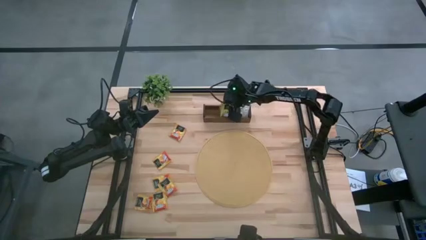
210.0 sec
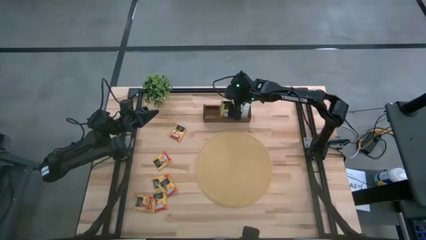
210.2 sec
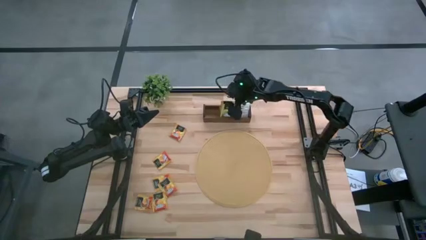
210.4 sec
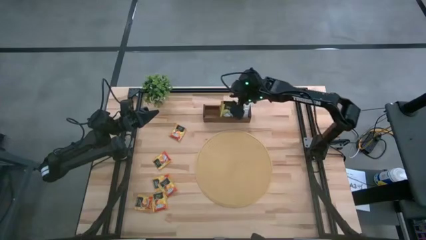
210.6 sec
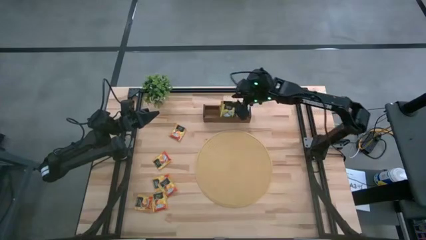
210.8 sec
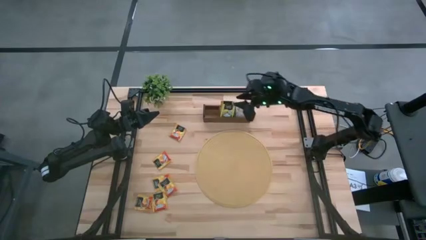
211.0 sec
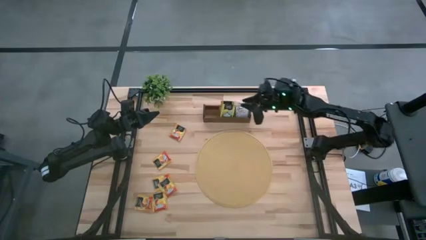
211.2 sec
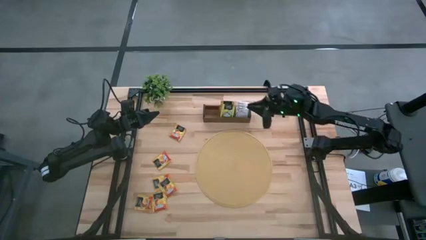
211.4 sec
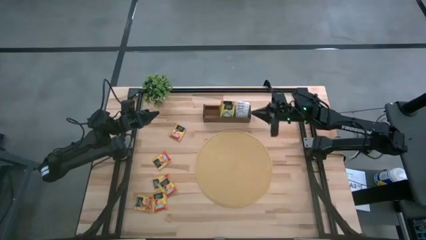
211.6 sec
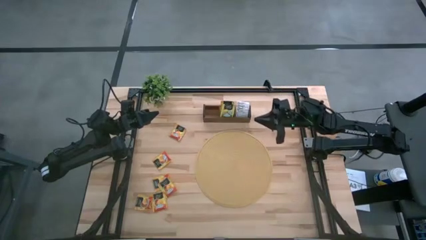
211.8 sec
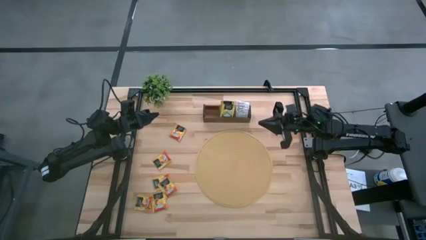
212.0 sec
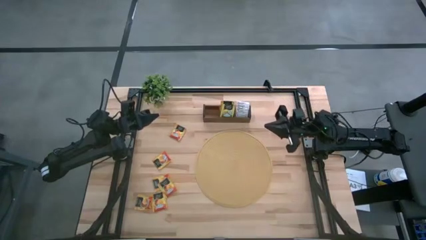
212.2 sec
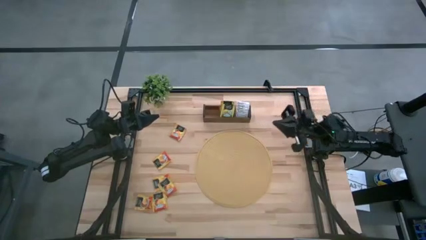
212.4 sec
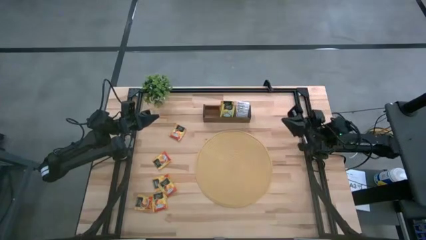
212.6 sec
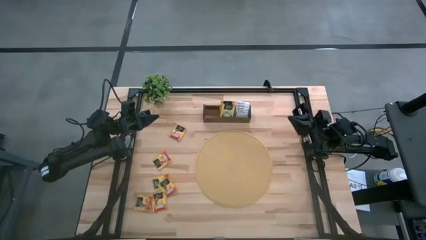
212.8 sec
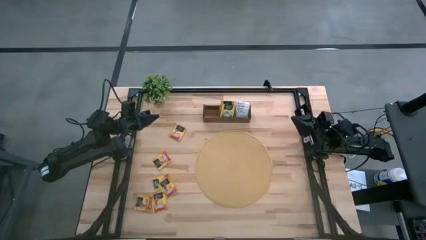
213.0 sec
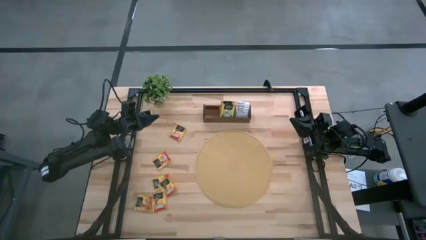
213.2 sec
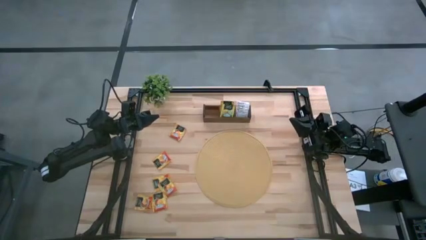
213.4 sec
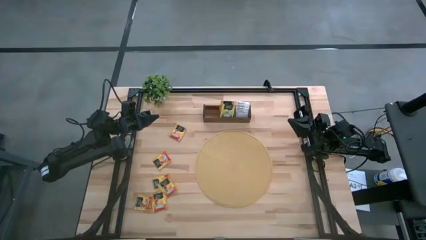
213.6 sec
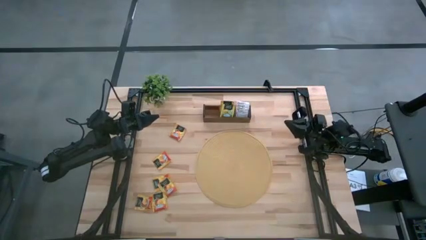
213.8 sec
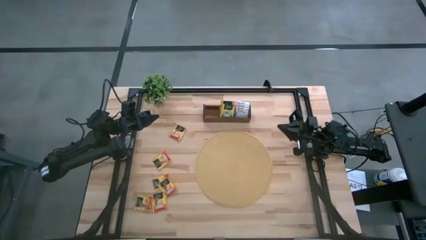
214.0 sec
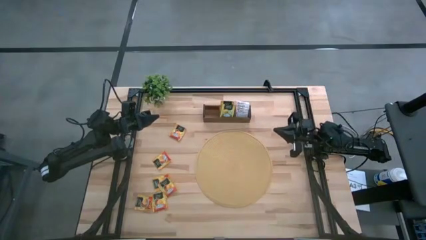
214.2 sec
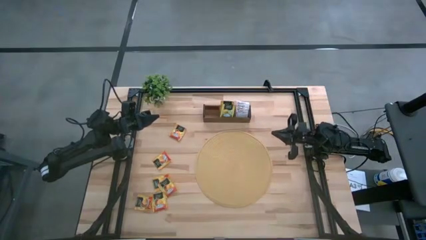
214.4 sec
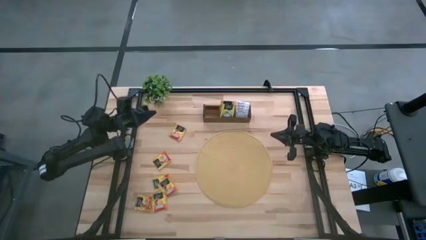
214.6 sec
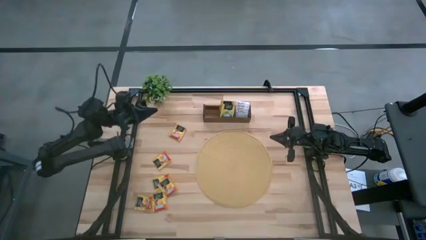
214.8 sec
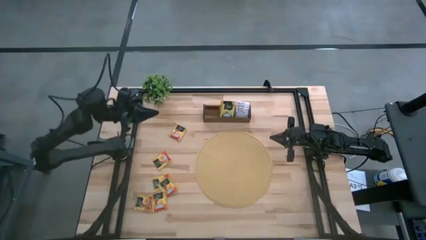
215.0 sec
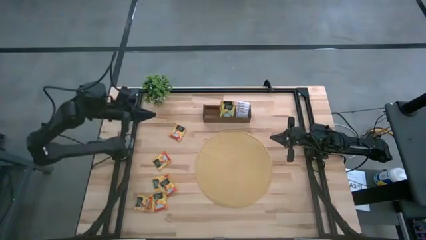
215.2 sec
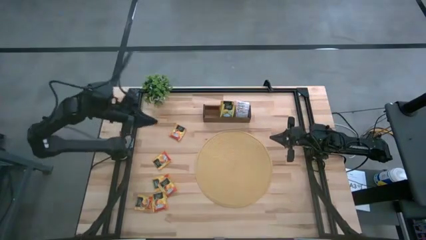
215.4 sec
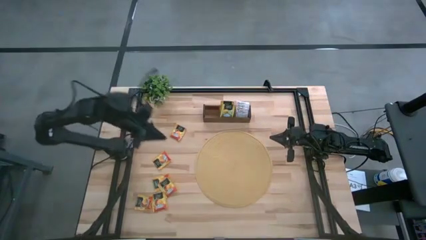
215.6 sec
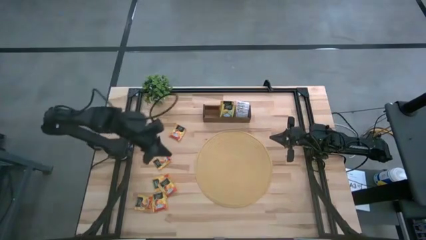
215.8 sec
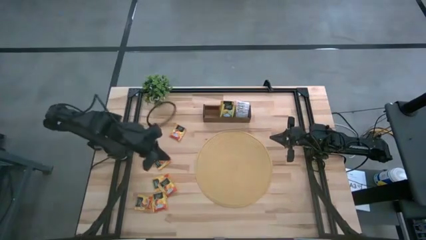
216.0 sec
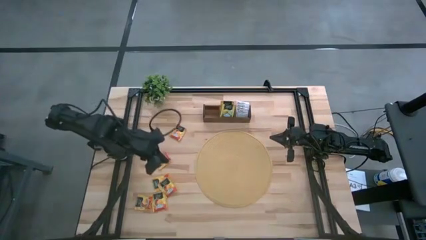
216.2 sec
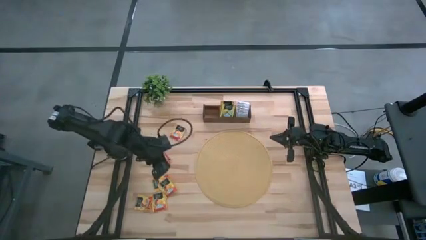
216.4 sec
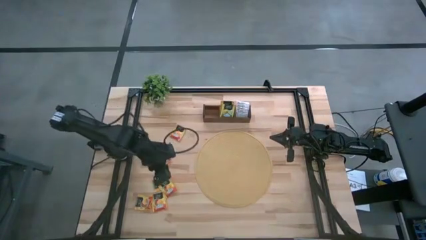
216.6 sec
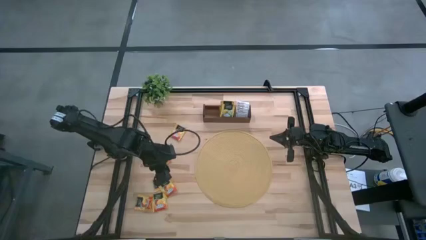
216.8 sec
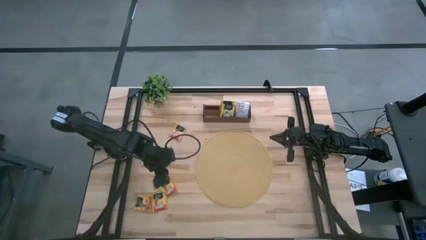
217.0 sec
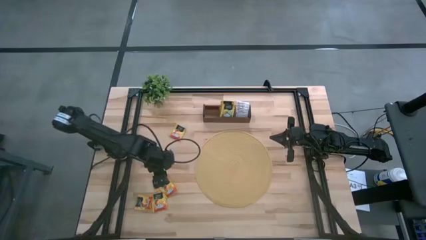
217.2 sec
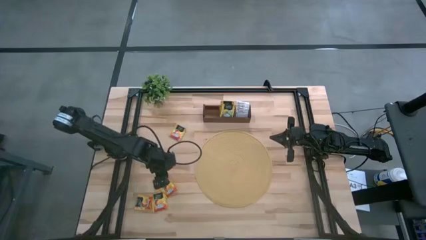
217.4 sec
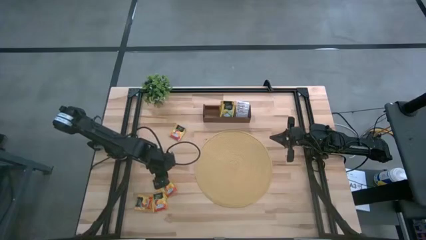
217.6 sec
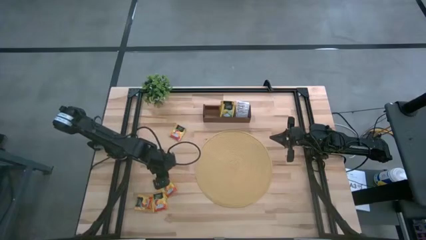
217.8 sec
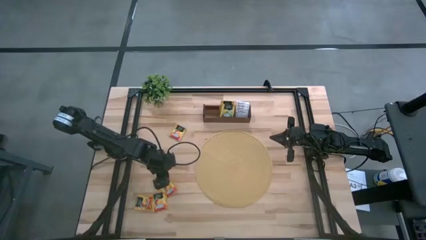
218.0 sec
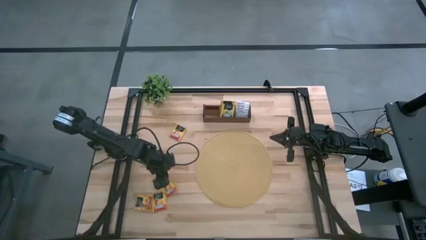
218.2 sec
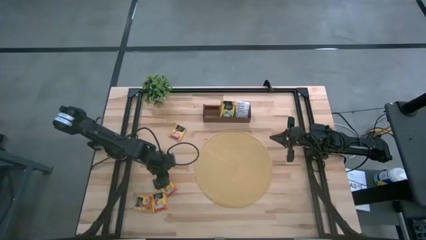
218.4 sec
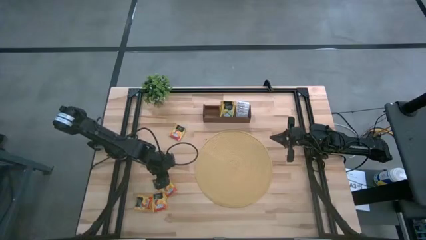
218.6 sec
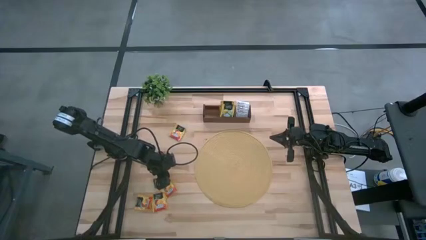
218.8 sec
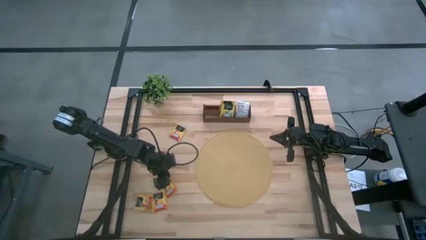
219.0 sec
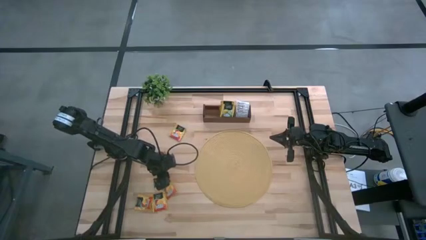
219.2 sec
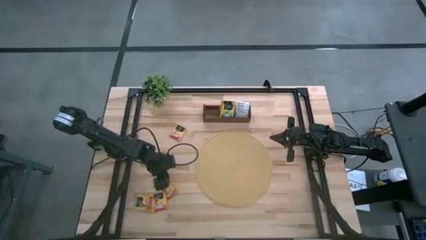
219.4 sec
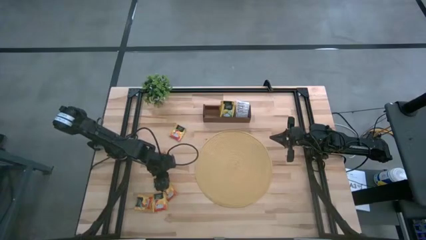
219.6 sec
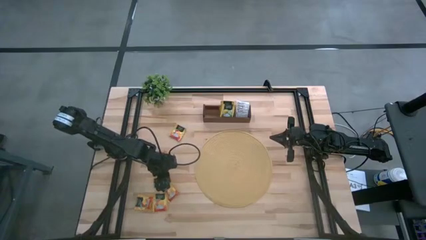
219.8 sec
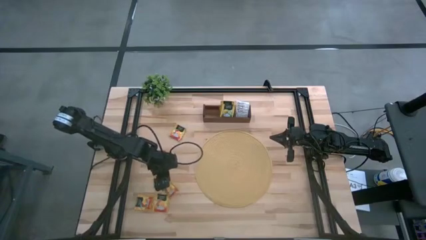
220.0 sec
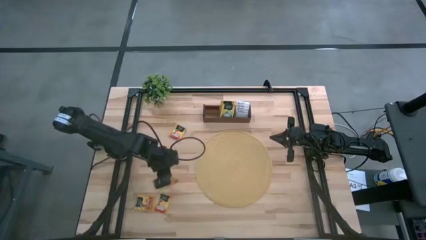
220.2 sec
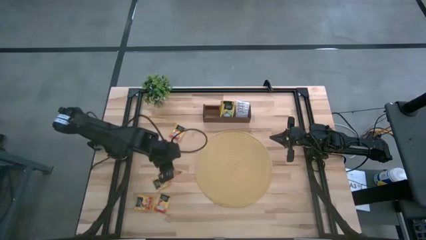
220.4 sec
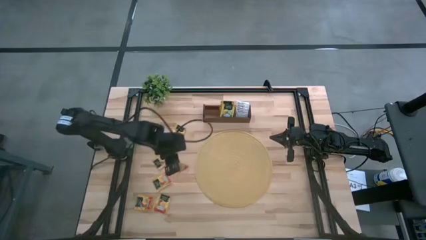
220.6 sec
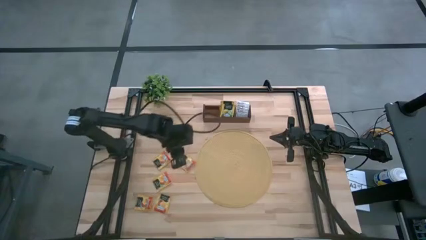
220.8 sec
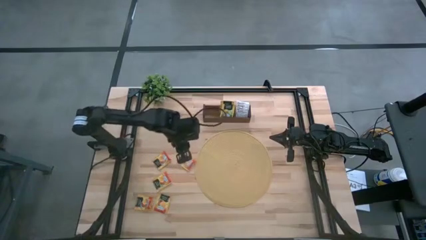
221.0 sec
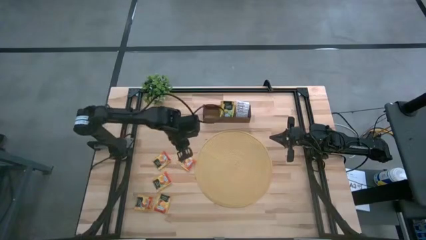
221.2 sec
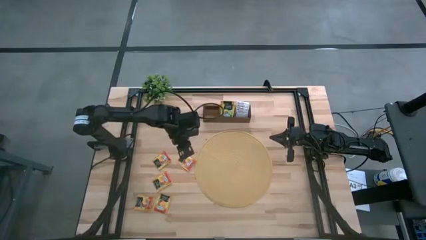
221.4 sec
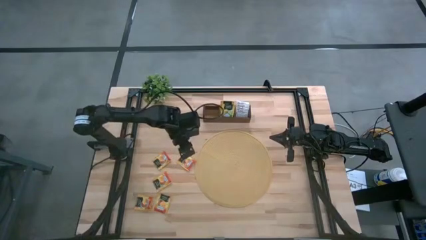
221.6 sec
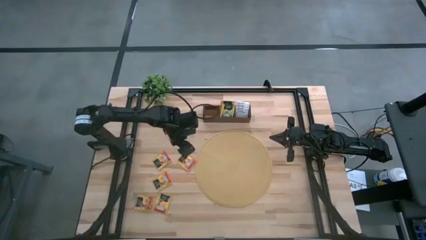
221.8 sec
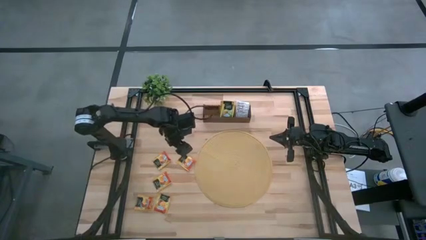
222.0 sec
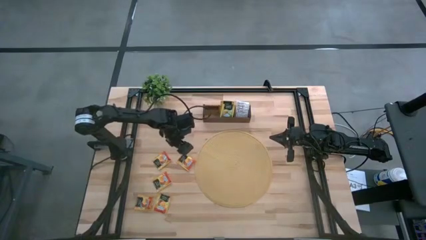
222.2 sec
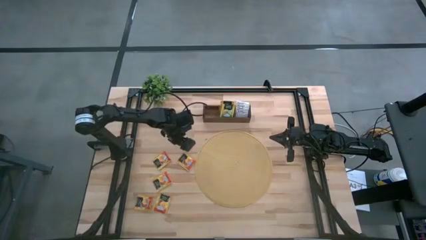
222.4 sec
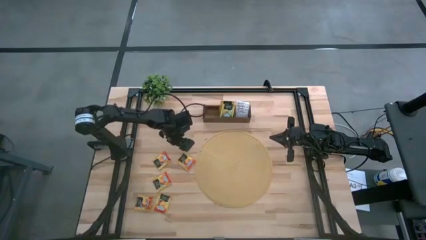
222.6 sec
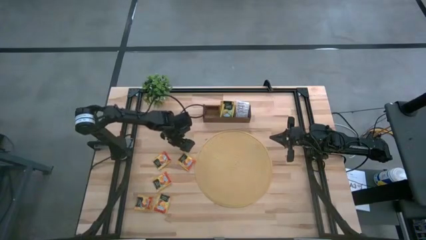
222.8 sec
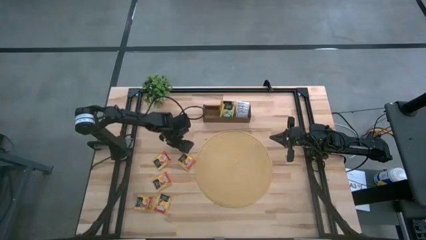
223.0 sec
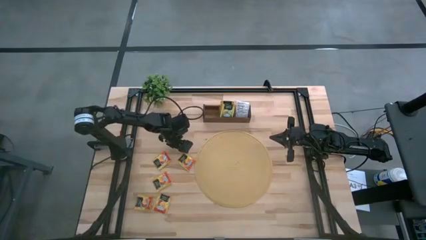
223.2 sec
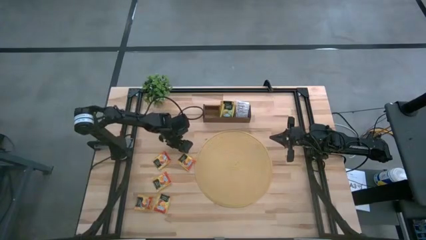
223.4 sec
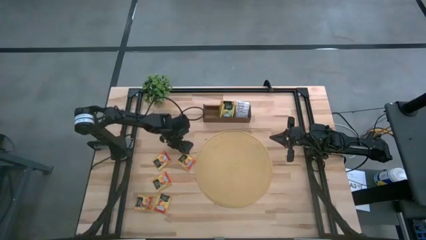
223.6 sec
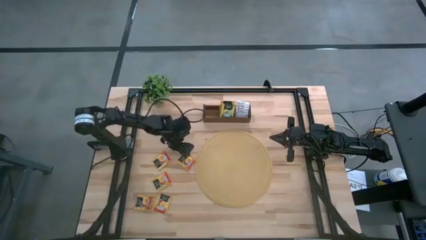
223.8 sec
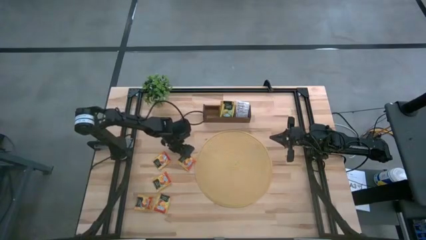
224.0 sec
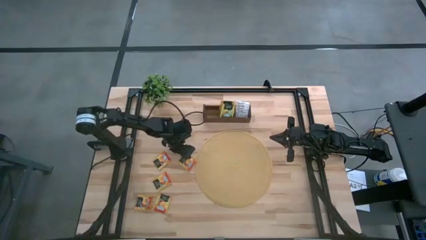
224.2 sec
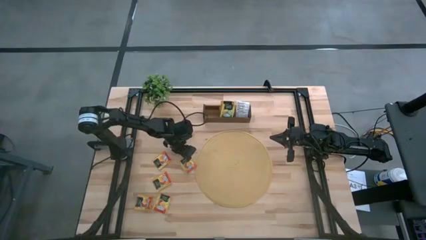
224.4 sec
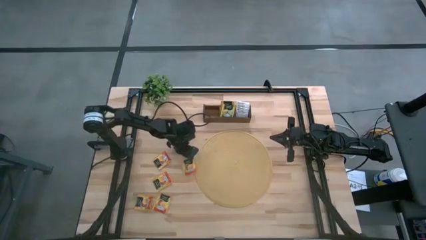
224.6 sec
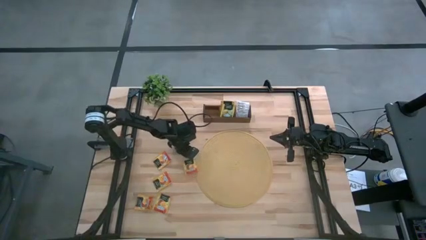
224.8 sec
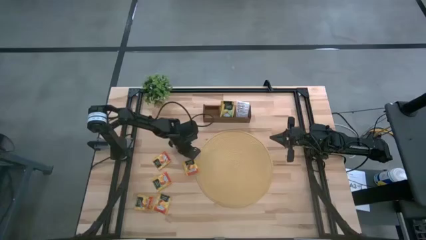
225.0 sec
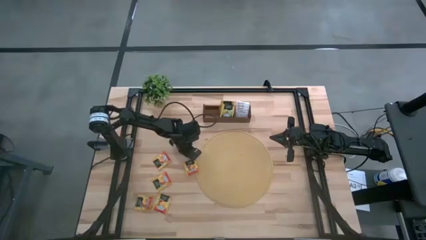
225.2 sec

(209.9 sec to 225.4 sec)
Task: Pick & Place Tea
Put the orange tea bag into the left section of the wooden organizer
